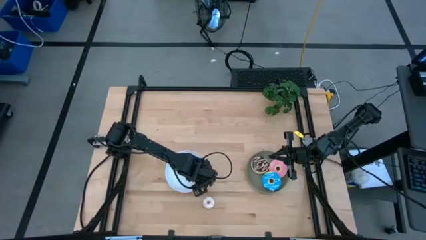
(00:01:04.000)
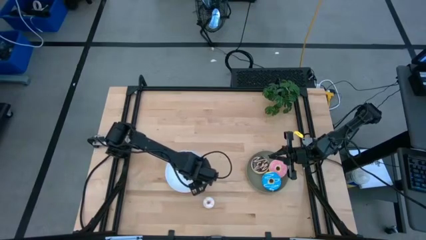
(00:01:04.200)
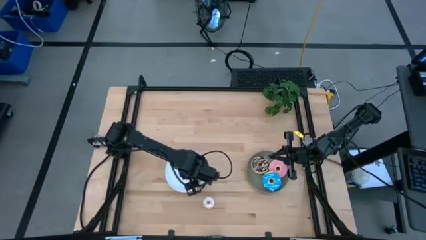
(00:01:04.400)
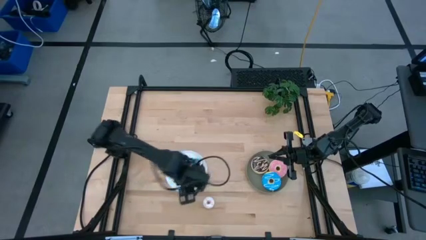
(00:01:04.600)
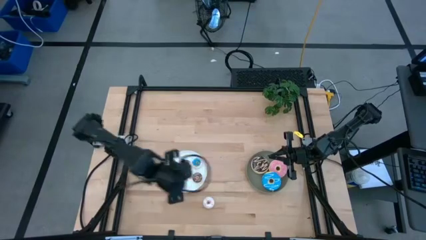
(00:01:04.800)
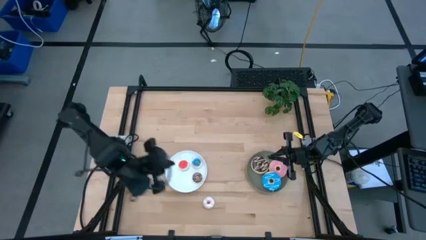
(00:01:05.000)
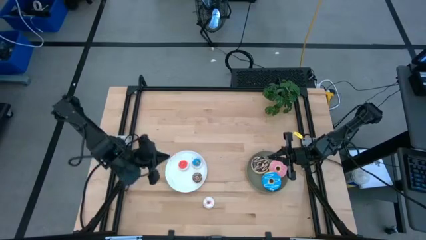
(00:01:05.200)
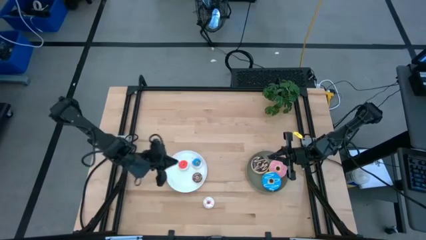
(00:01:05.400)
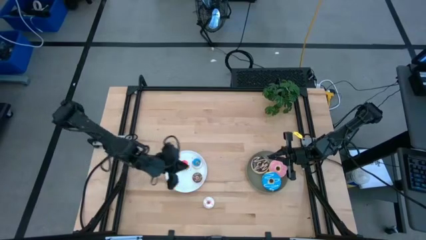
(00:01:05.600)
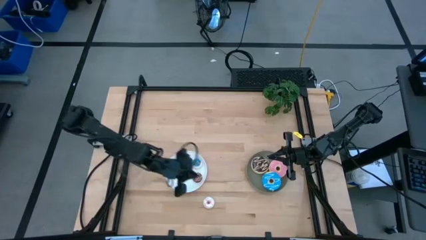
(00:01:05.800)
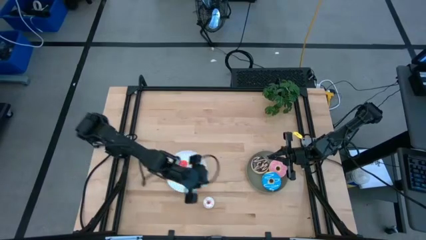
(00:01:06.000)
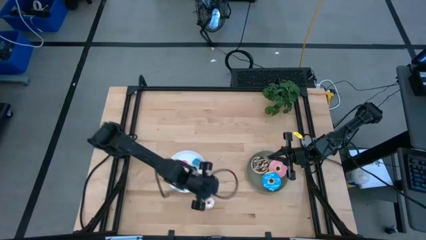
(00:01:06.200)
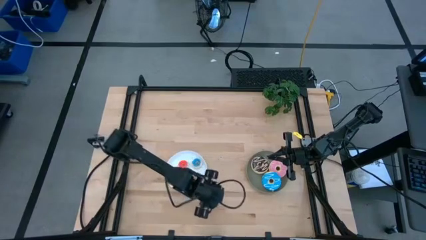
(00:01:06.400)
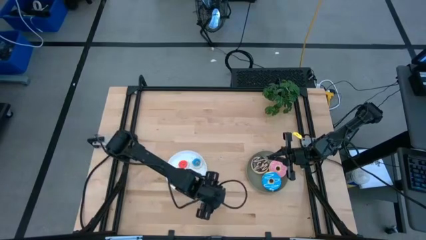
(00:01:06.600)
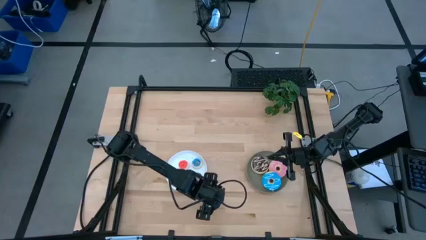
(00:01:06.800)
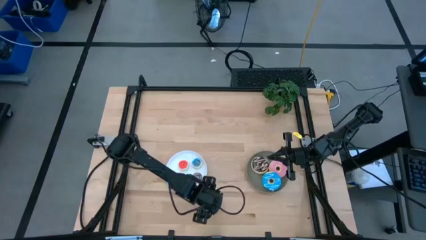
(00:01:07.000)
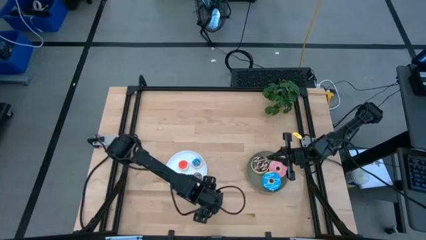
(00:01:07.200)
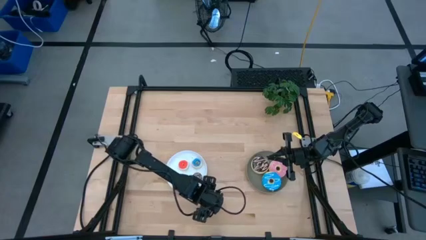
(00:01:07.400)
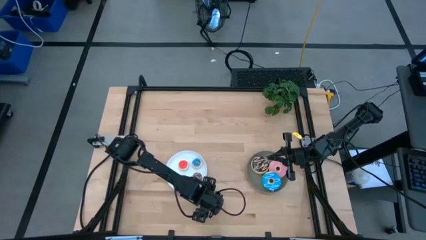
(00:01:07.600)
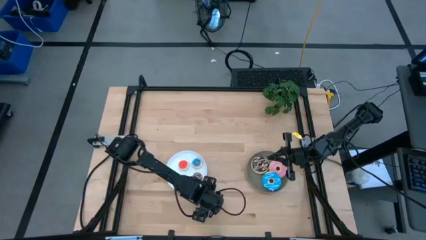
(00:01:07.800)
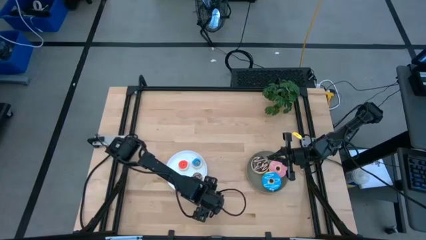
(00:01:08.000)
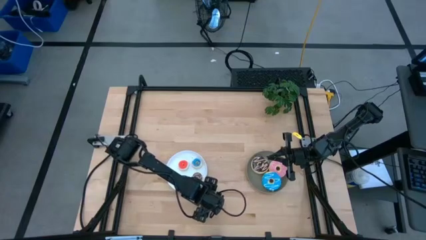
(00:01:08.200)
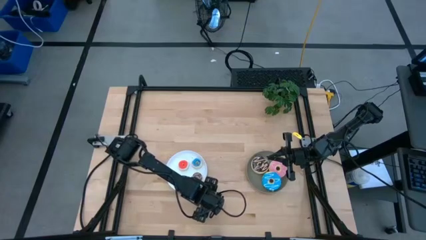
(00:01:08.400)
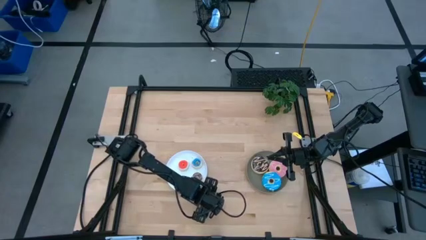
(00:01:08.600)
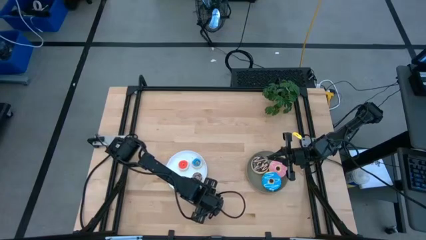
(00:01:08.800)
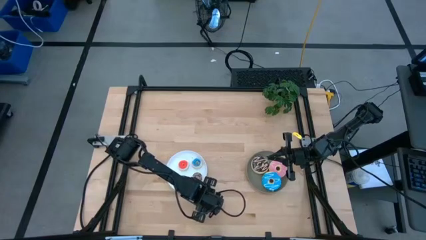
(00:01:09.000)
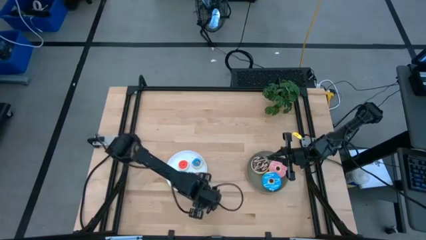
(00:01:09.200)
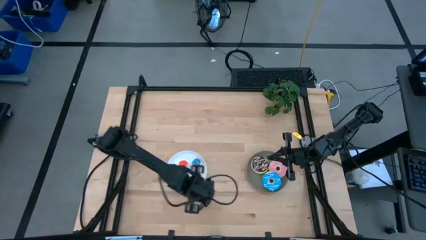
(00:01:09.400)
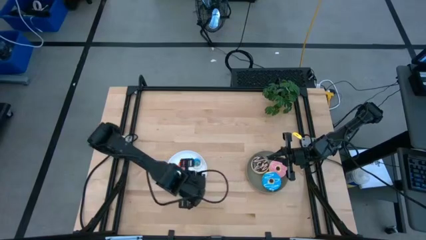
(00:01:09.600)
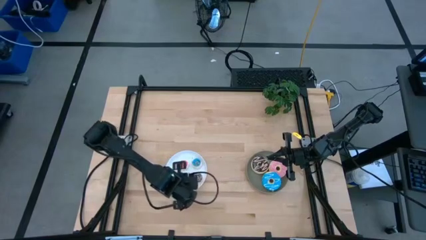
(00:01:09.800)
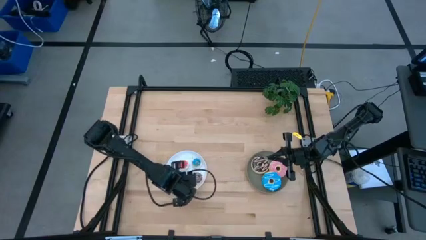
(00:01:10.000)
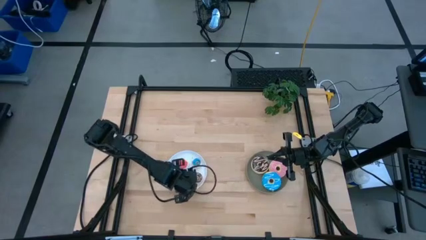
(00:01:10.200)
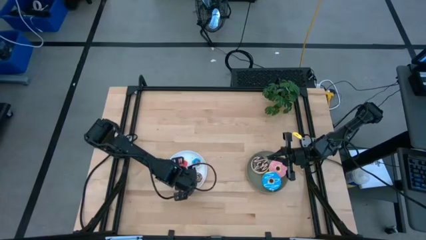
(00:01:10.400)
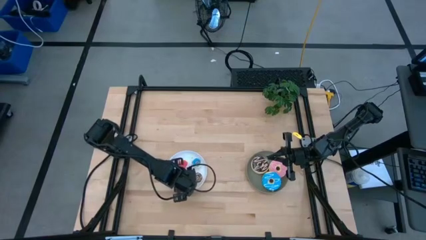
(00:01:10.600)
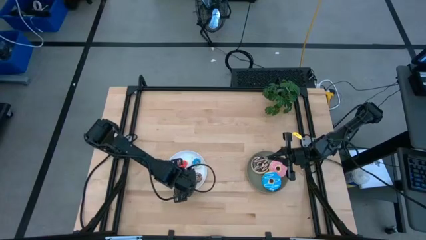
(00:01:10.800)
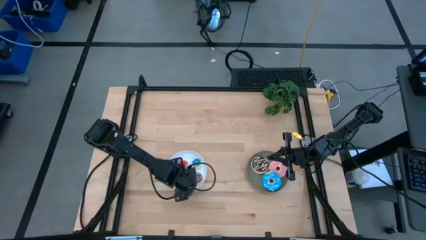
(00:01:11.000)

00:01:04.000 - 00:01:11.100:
Task: Pick & Place donuts
Put the small white donut on the white plate

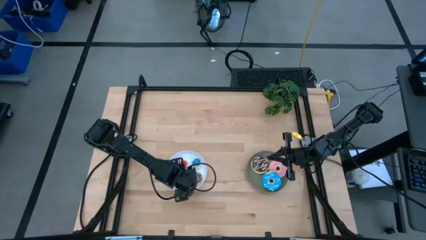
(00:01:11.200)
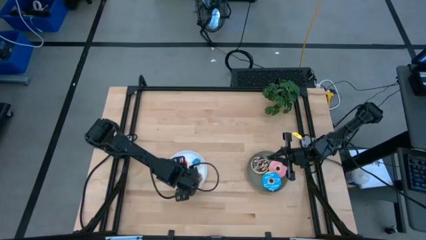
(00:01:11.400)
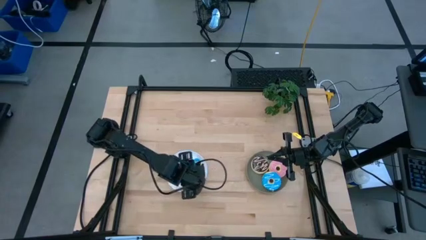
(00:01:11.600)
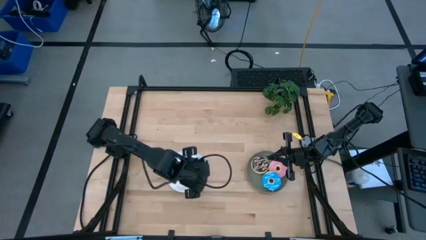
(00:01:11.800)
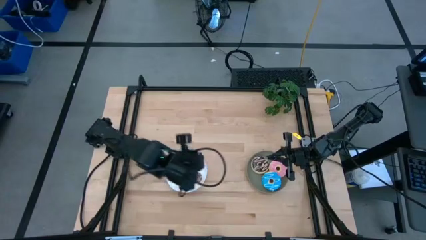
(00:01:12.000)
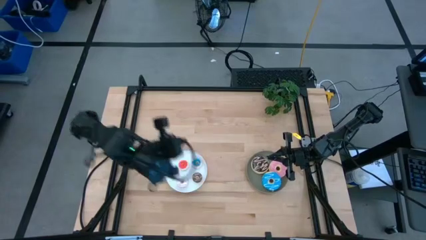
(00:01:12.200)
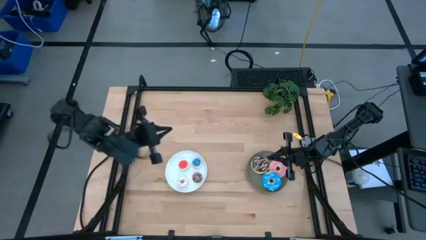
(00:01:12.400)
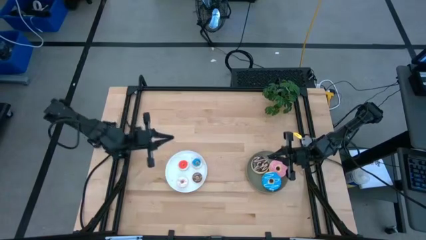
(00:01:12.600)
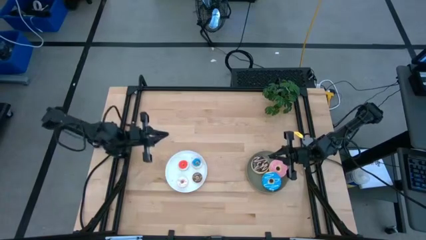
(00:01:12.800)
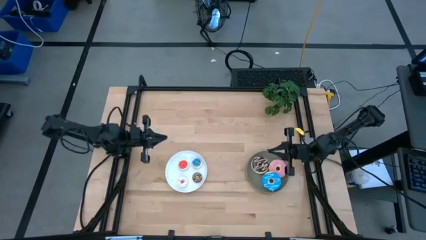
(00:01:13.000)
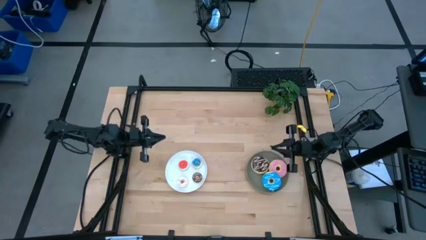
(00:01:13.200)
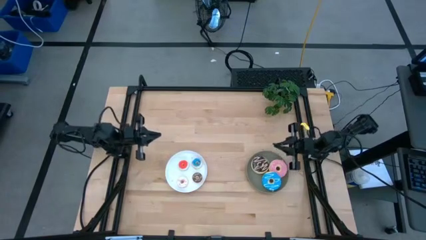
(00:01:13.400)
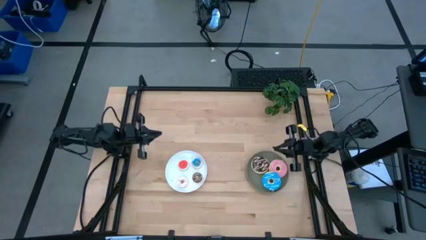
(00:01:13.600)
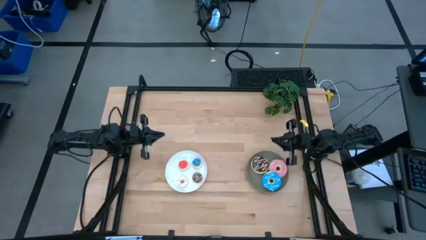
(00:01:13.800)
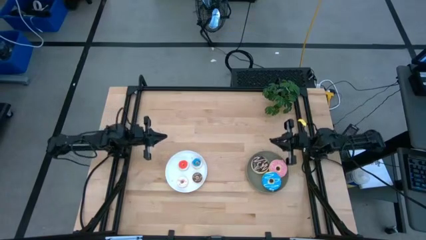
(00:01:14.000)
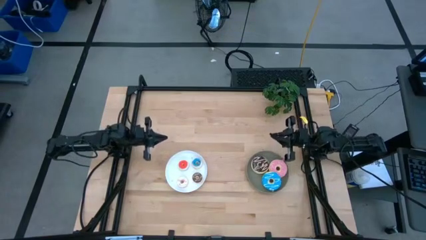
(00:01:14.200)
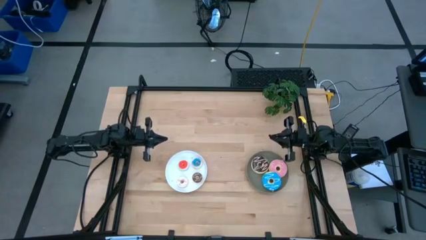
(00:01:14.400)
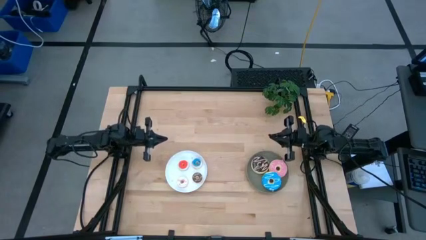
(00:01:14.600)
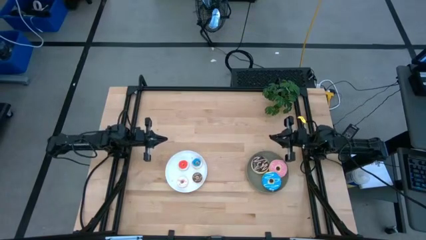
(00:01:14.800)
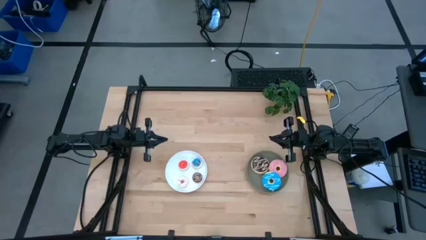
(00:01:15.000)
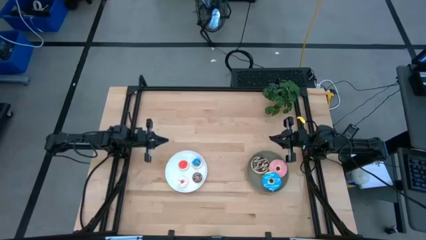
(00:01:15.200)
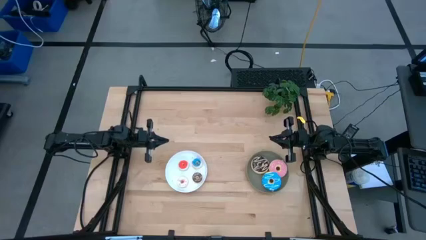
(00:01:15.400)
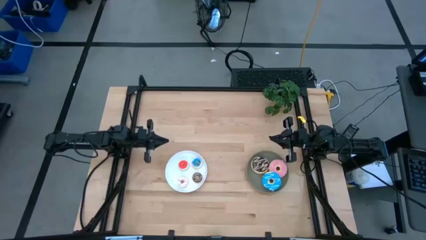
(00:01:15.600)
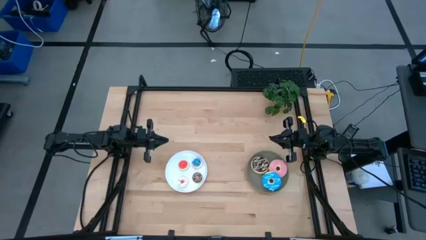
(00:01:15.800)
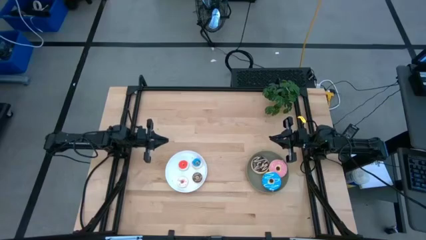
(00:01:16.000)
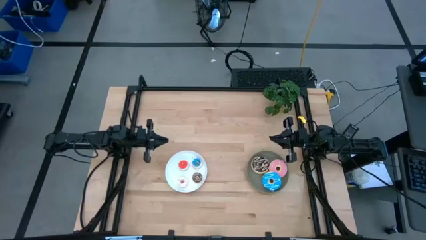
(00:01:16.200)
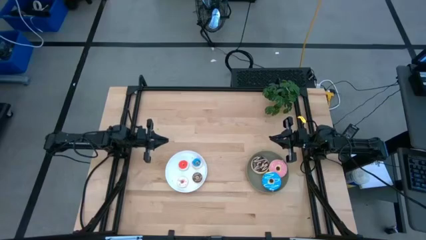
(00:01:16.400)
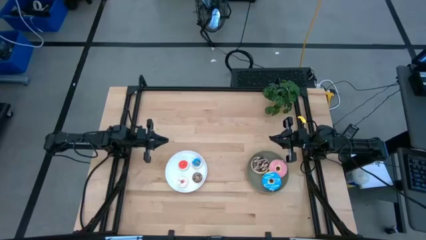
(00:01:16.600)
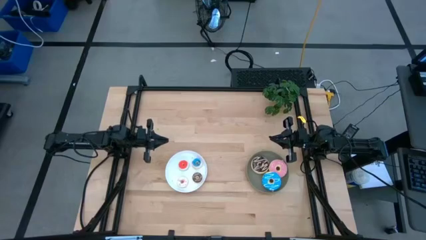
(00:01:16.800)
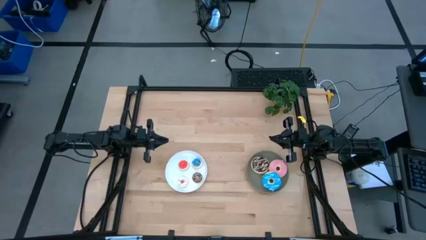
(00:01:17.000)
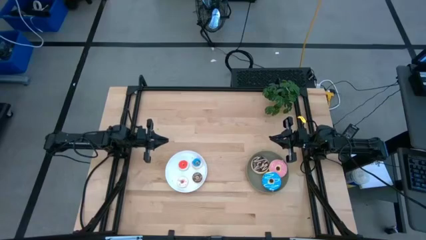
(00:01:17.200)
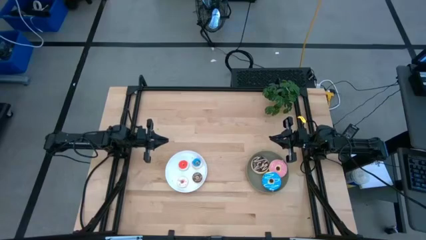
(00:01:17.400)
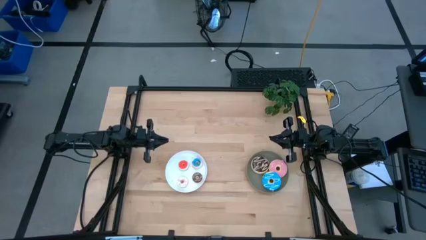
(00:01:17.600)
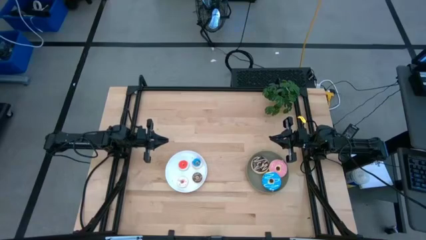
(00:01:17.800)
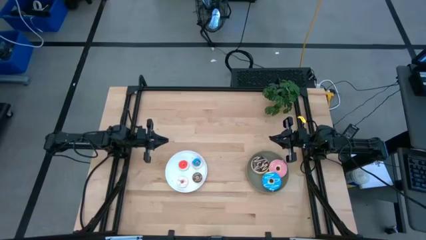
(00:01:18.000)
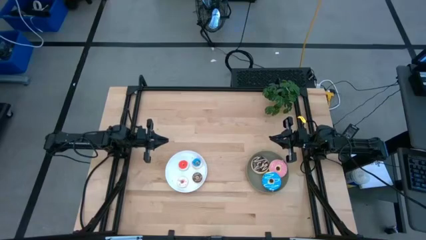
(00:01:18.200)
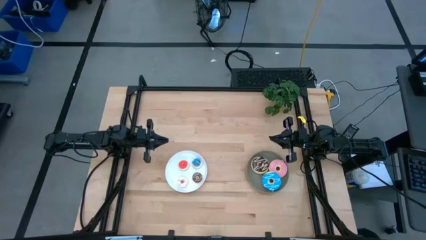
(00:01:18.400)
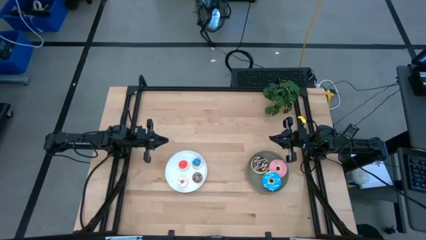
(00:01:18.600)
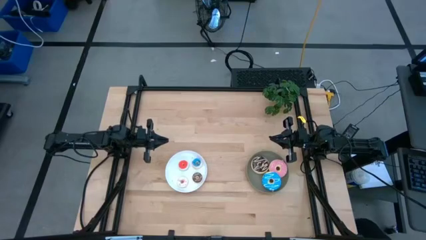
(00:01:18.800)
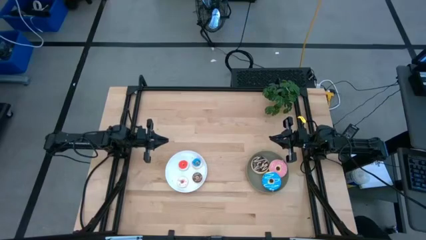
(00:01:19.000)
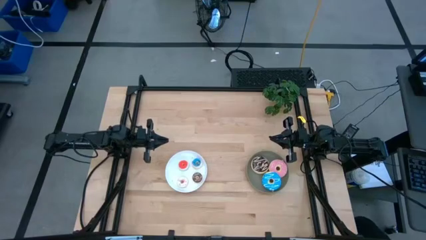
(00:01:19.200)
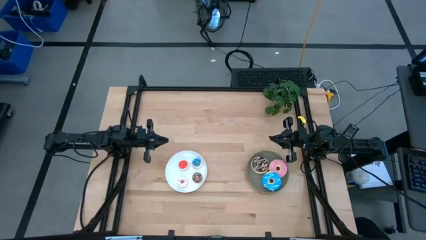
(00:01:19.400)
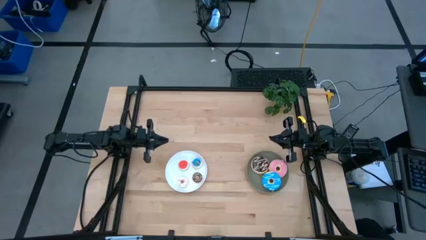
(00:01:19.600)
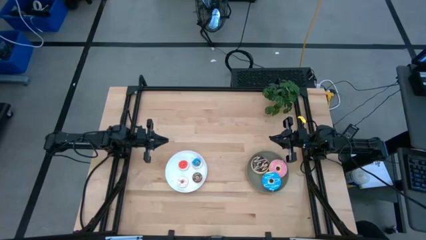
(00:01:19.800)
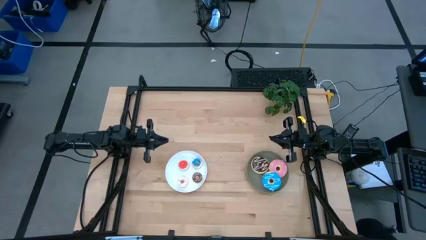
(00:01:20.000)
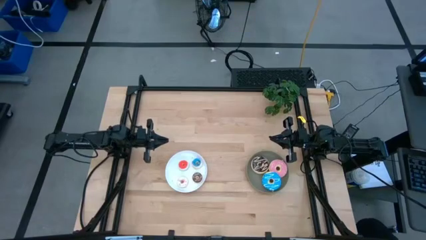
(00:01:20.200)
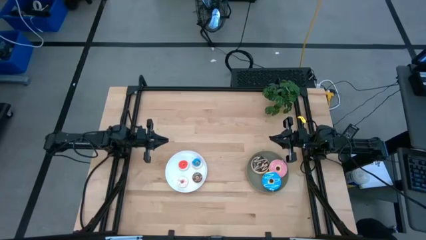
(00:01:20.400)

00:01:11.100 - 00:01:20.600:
Return to Home Position
